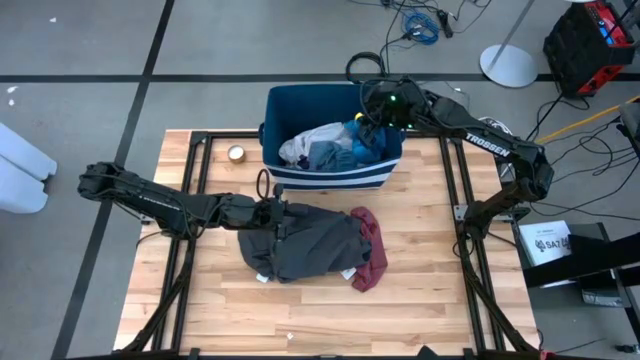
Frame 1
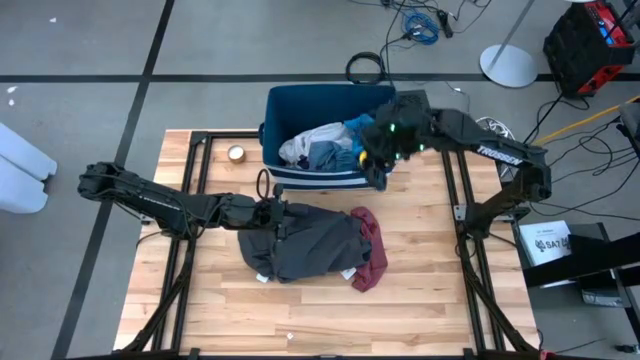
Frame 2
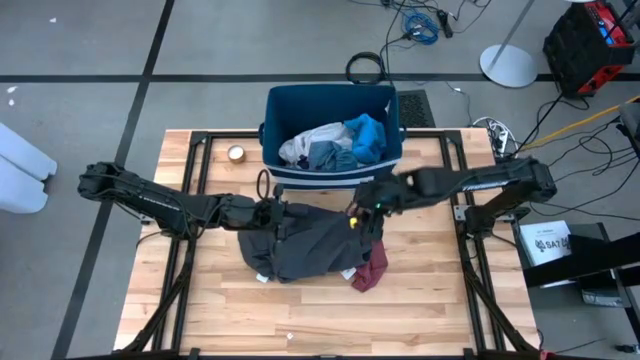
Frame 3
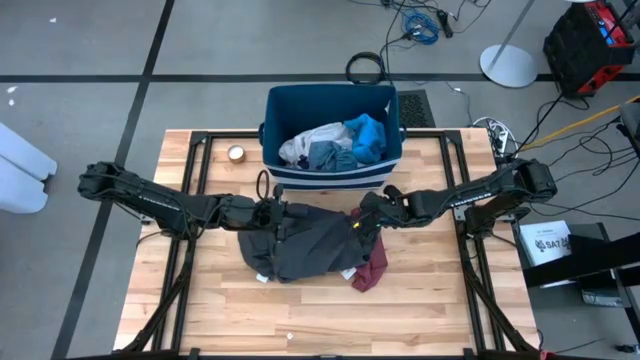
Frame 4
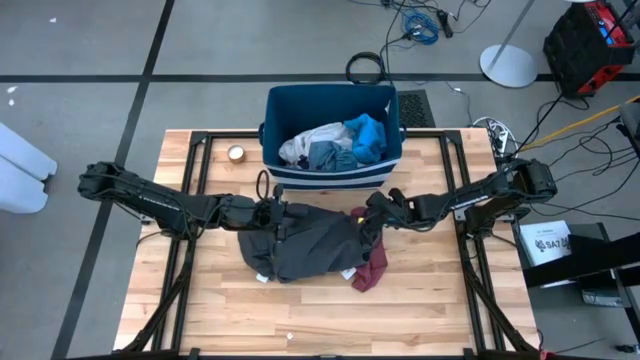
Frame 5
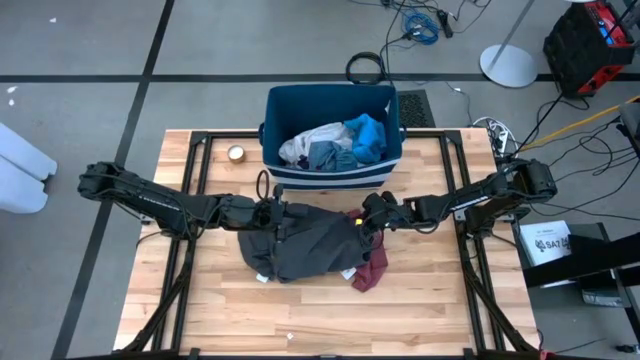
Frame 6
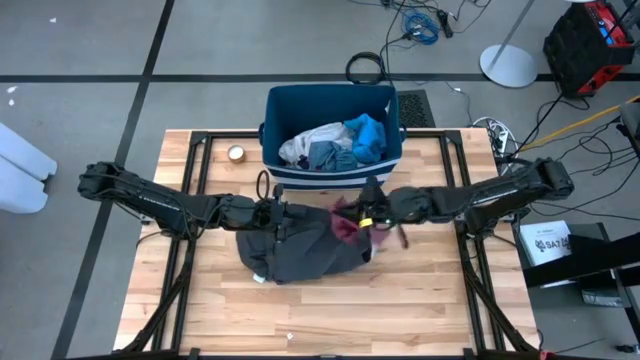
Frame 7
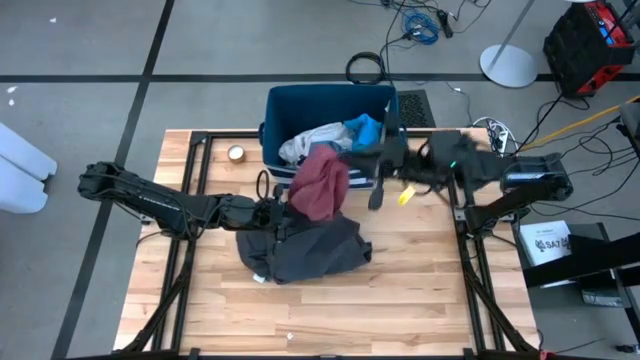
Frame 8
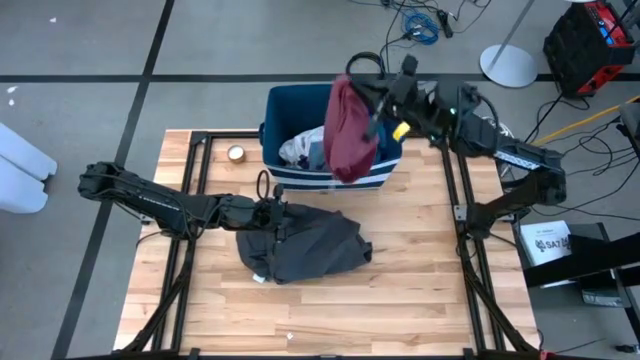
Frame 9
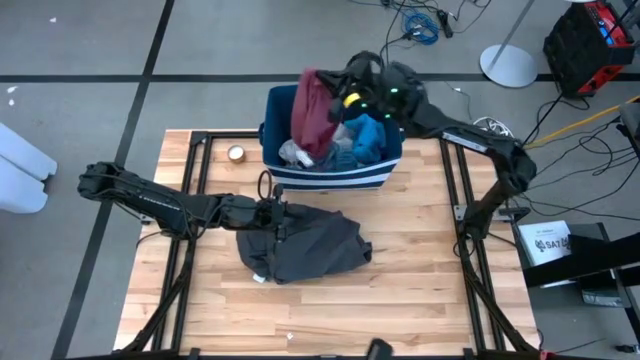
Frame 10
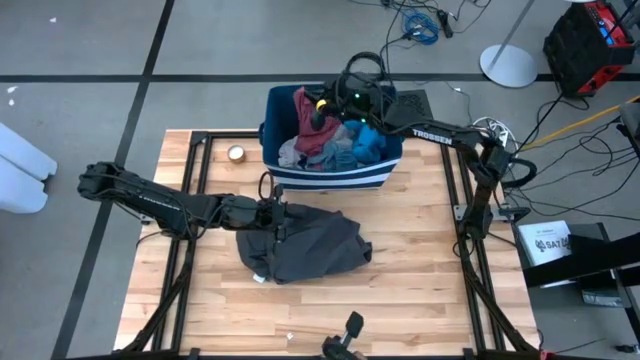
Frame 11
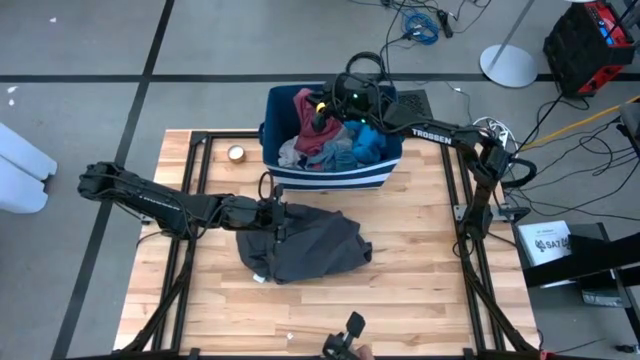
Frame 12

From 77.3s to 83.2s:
Task: Sort clothes
Put the red underwear into the blue bin

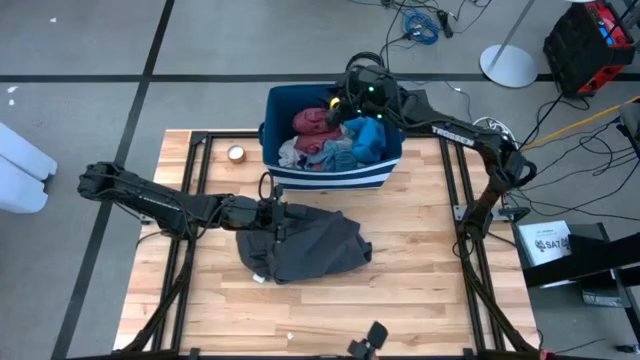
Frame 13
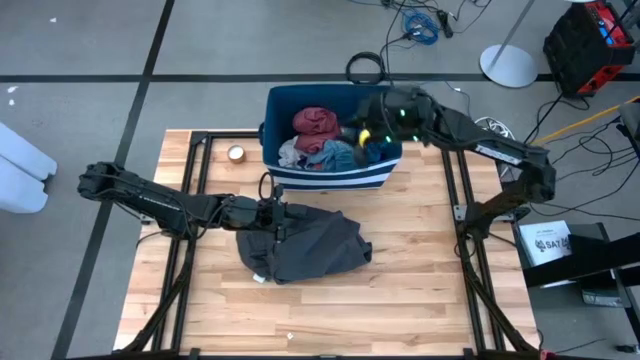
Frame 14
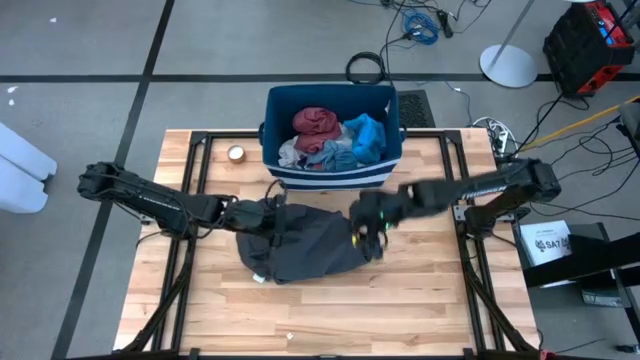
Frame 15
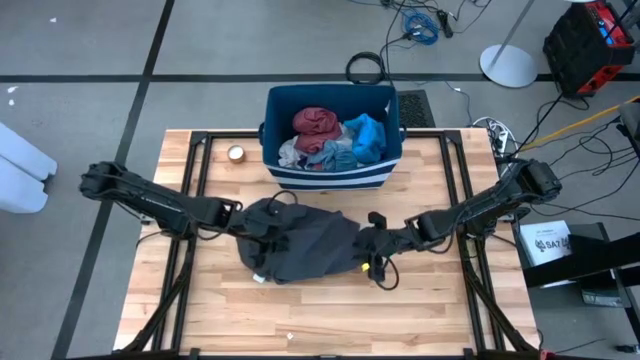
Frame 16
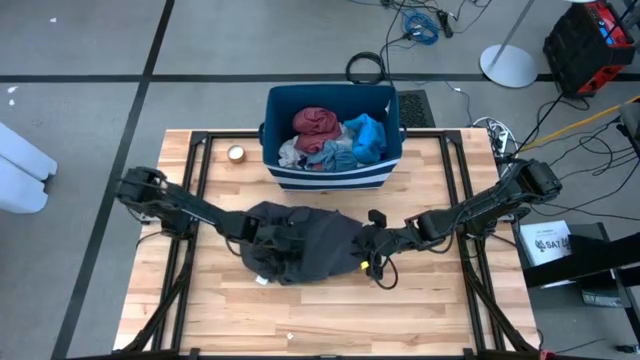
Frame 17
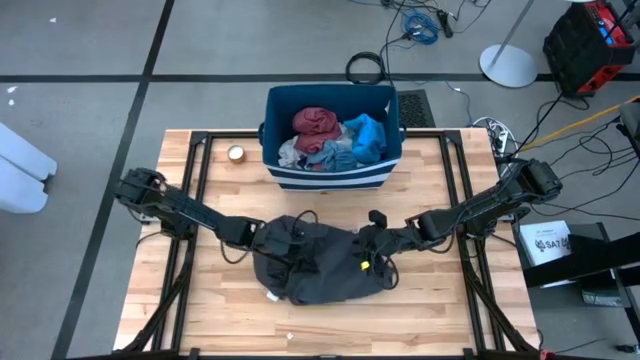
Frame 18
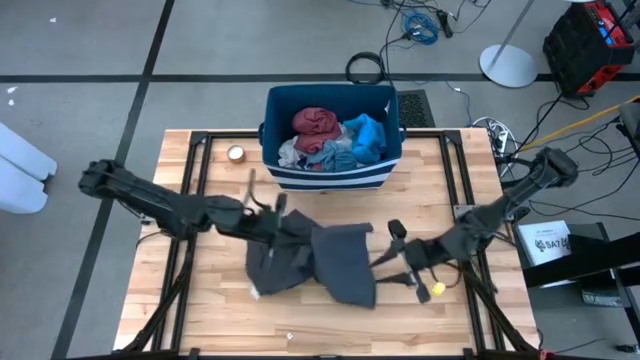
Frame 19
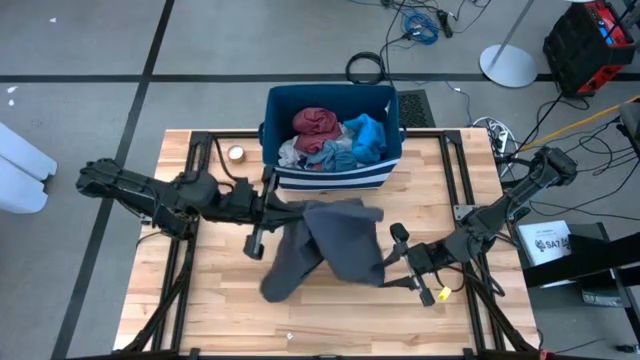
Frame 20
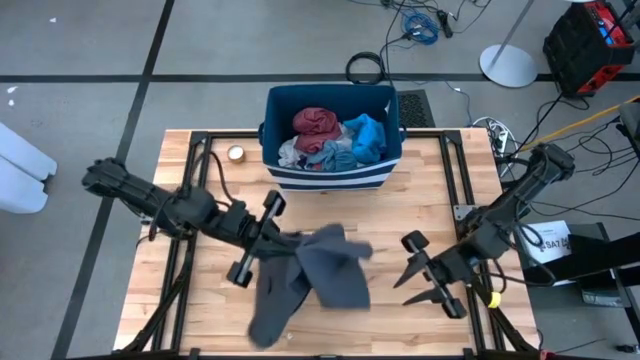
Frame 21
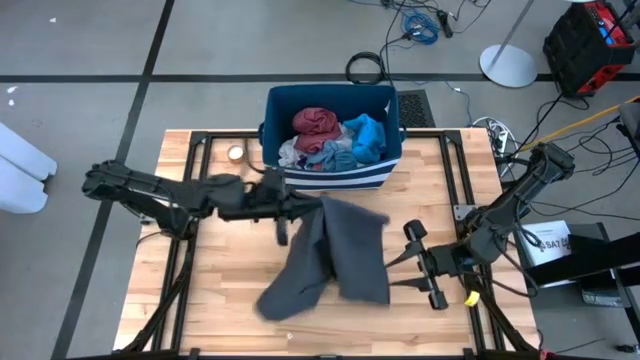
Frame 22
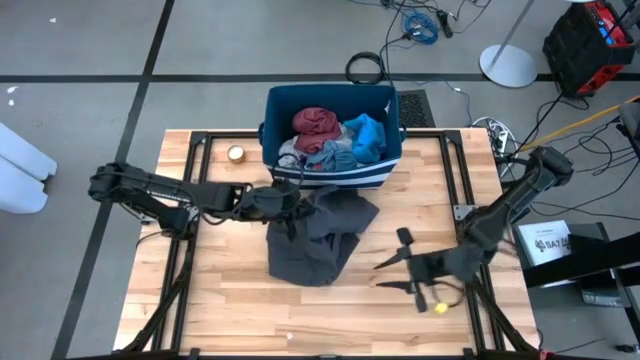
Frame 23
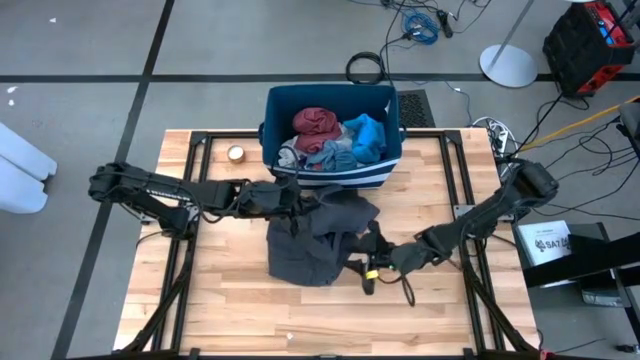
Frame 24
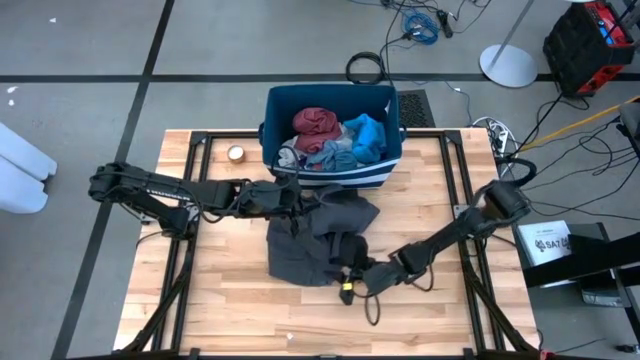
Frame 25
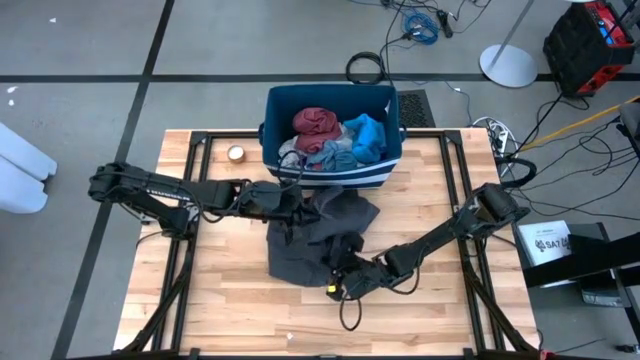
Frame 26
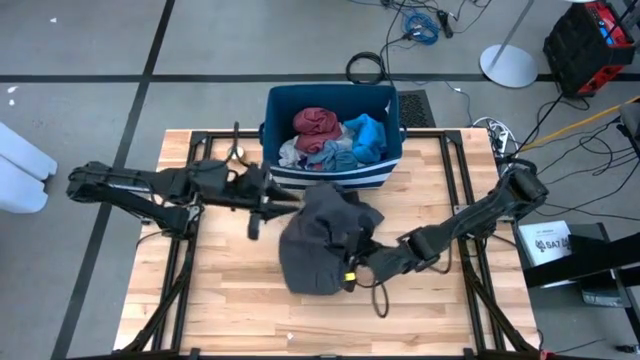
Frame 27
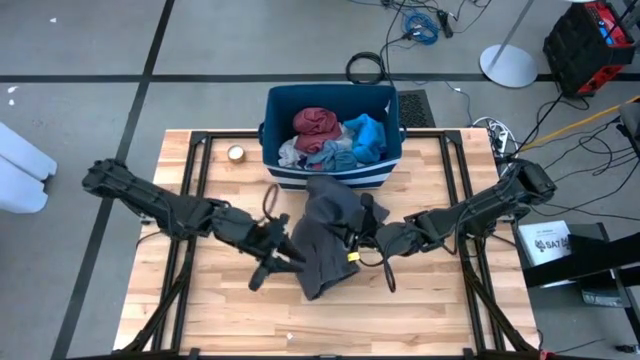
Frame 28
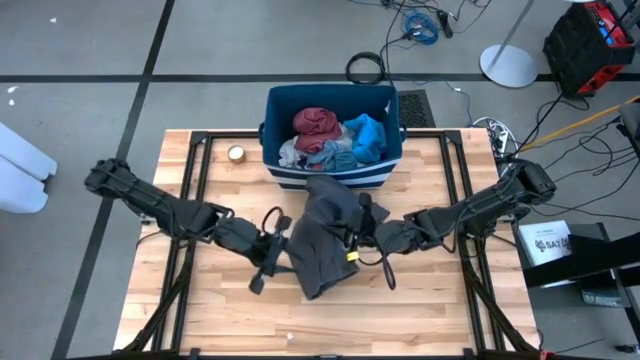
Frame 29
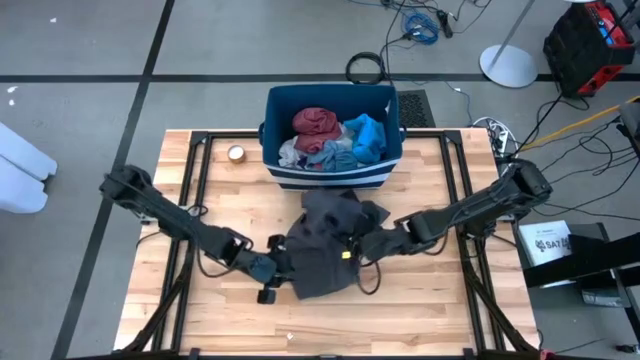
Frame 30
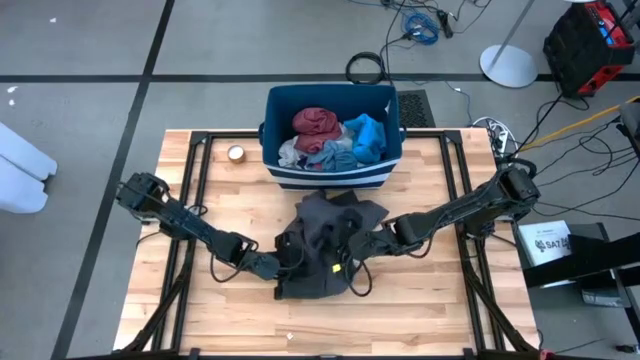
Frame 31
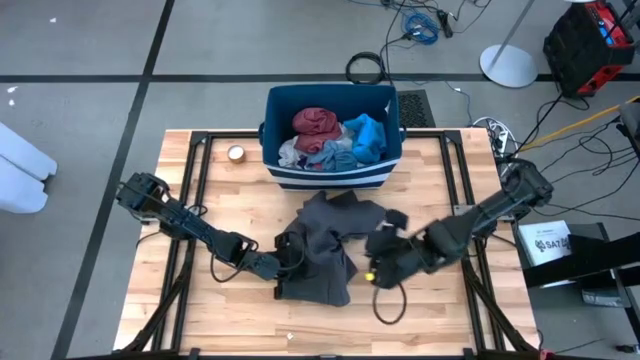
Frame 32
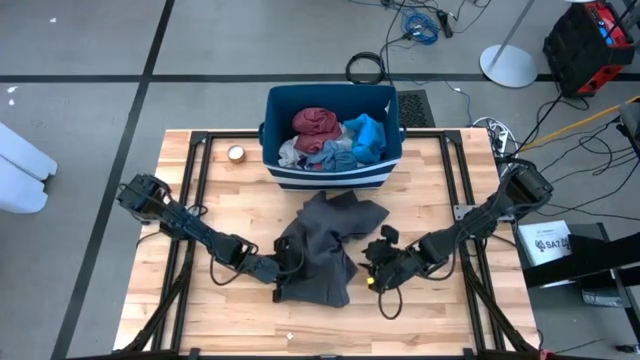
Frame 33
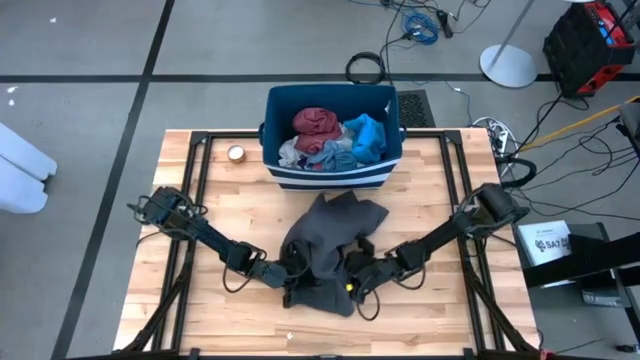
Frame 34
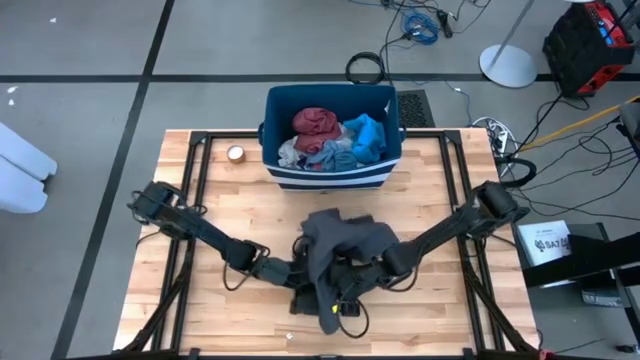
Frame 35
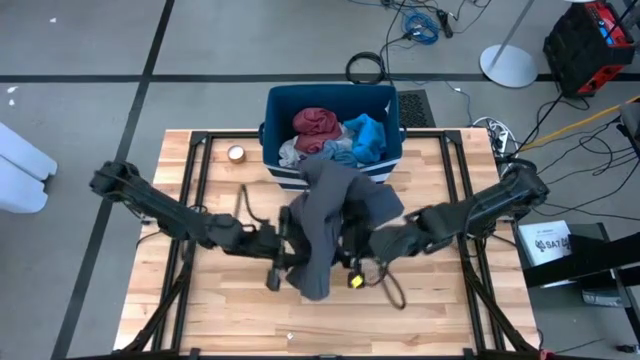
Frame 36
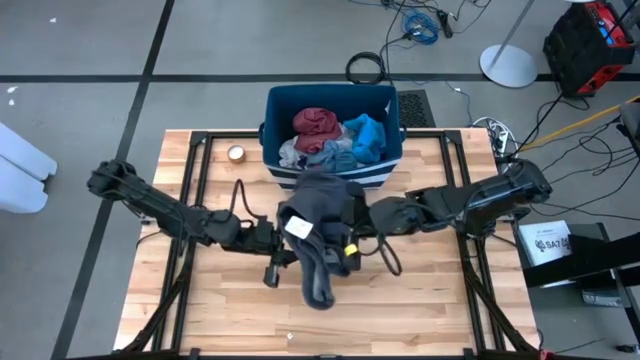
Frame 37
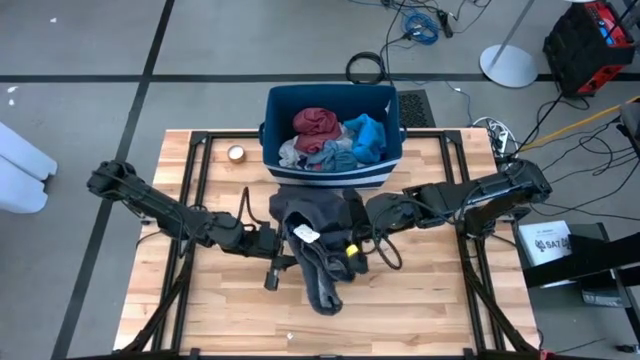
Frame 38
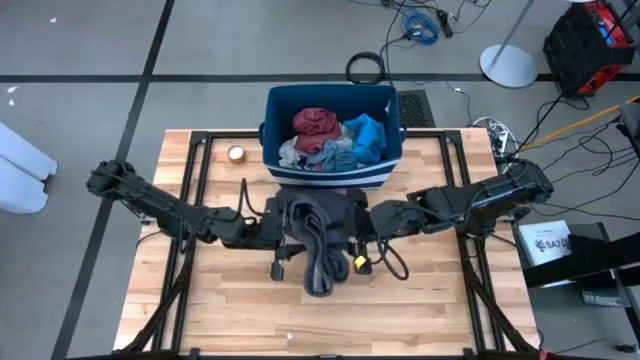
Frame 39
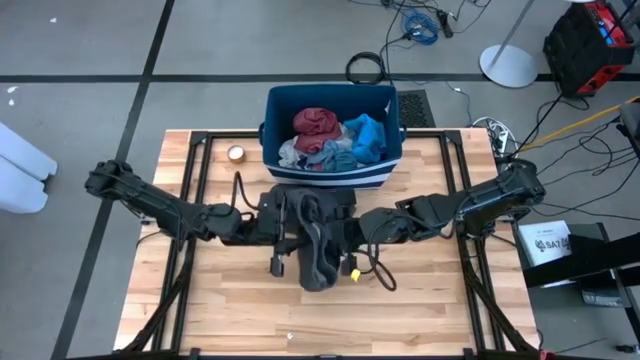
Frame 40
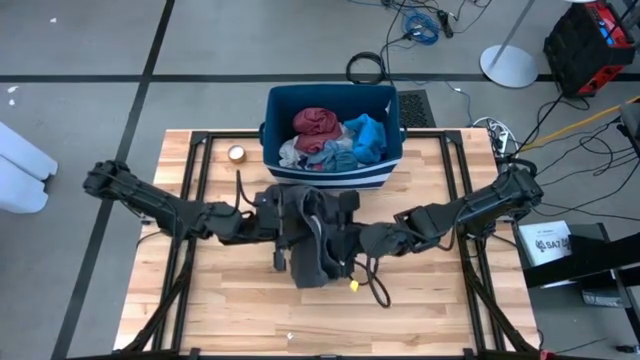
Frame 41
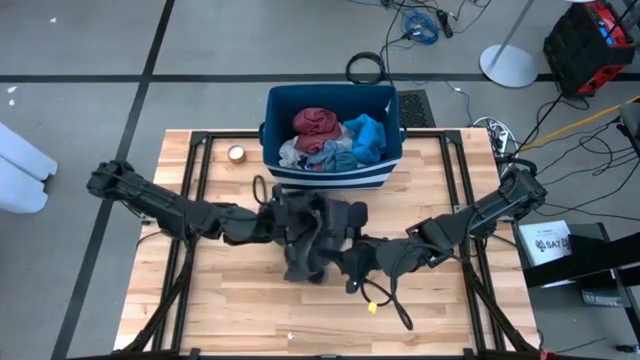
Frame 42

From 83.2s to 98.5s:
Put the gray short into the blue bin

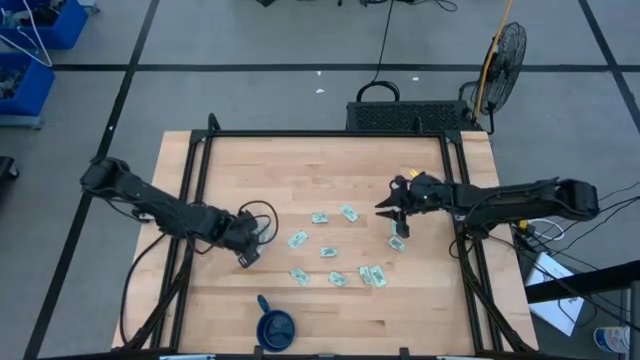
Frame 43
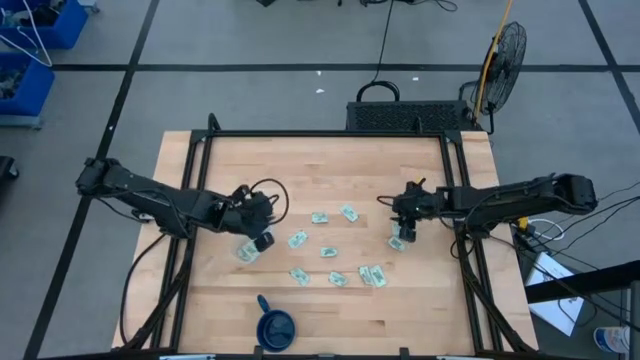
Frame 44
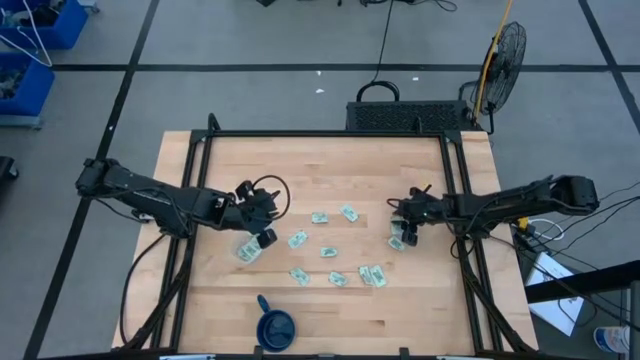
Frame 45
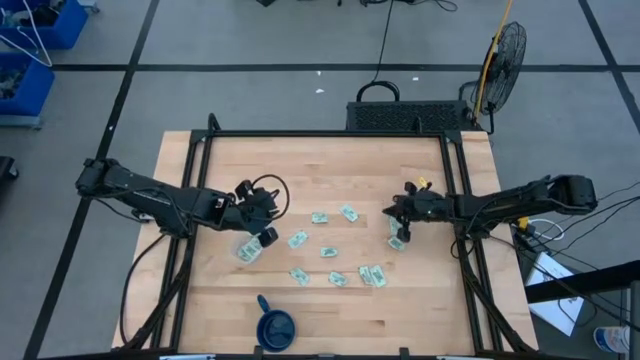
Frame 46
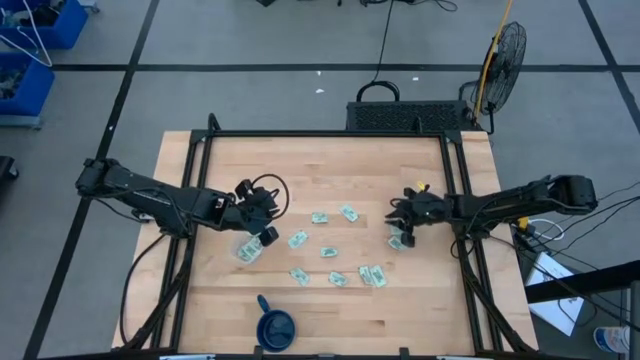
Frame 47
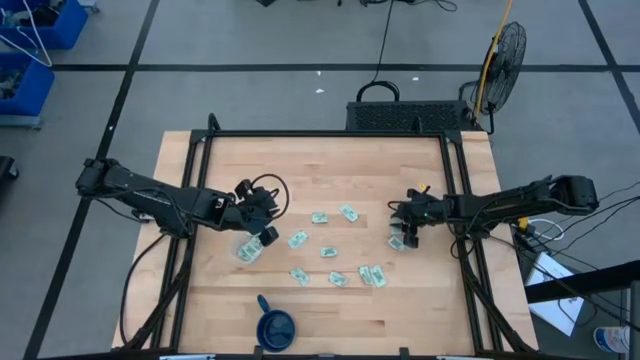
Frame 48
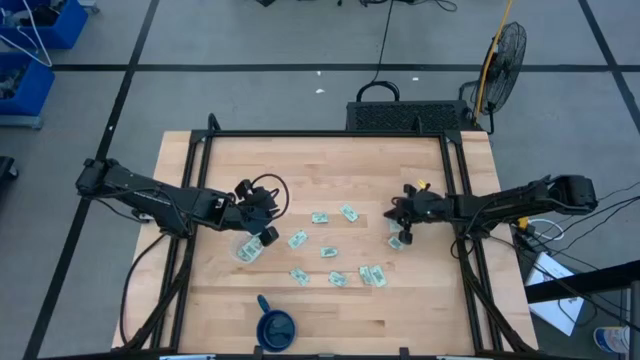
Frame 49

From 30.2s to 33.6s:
Task: Pick and place Stevia / Truvia into bins
Put the stevia packet into the transparent container
